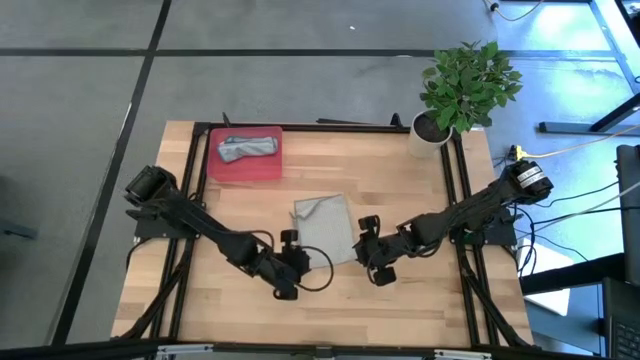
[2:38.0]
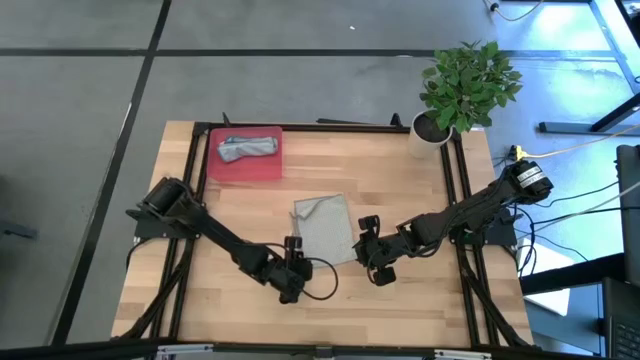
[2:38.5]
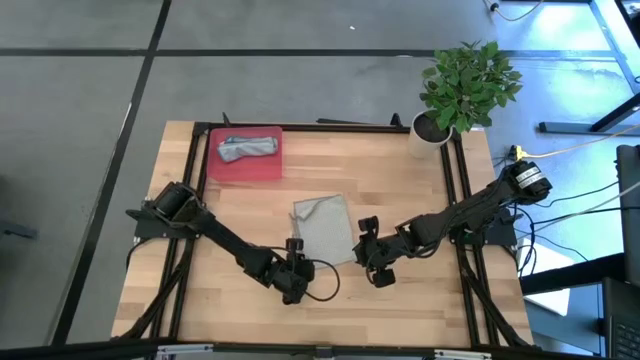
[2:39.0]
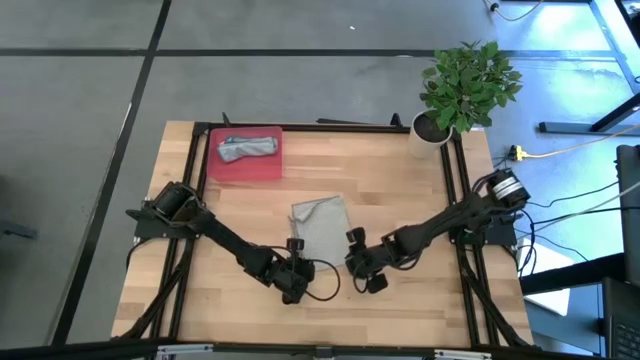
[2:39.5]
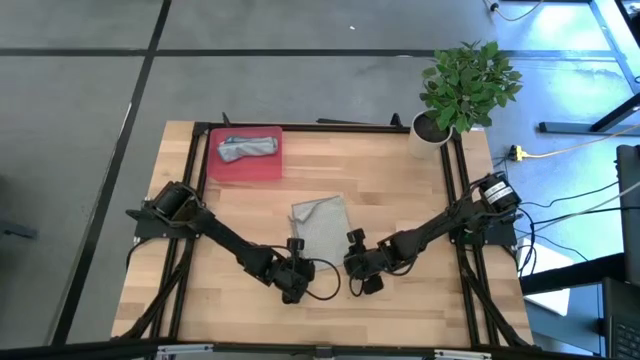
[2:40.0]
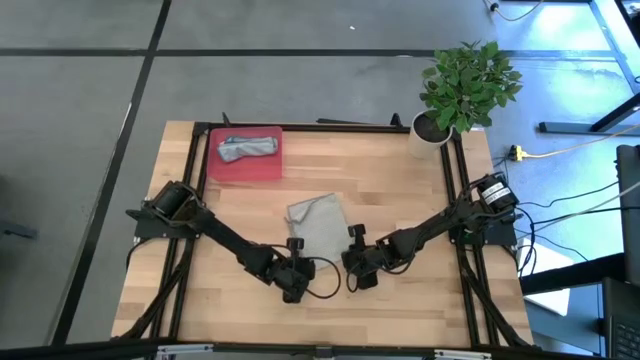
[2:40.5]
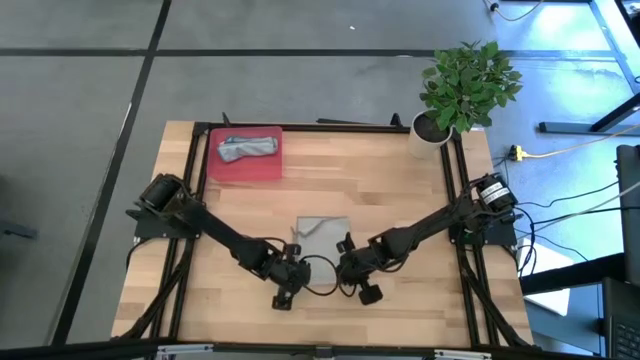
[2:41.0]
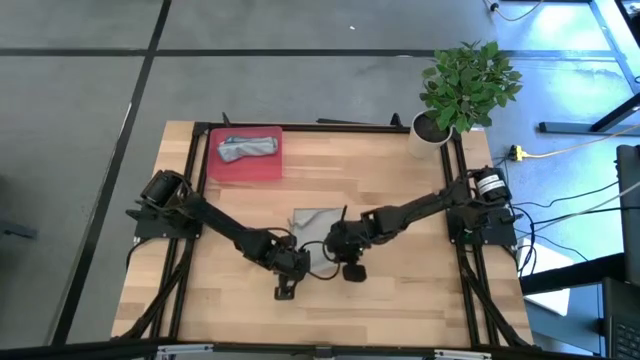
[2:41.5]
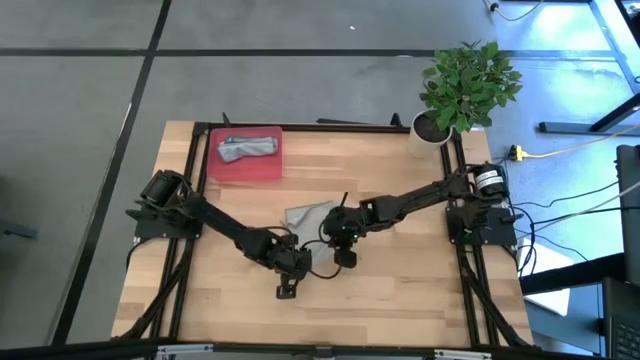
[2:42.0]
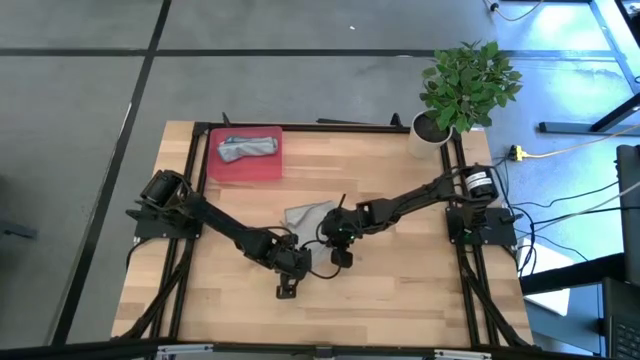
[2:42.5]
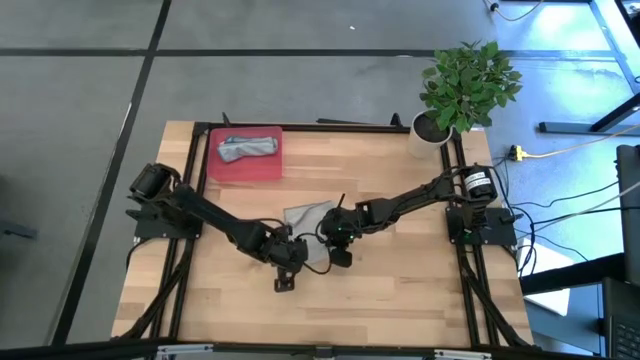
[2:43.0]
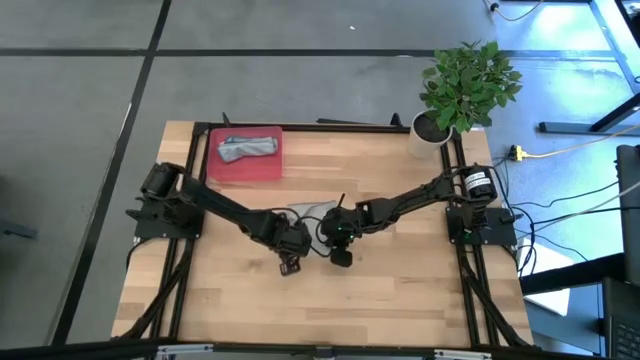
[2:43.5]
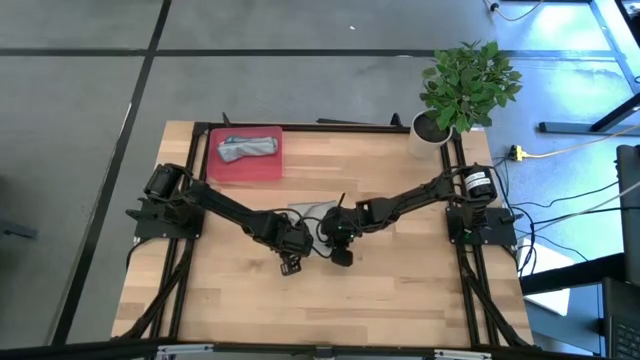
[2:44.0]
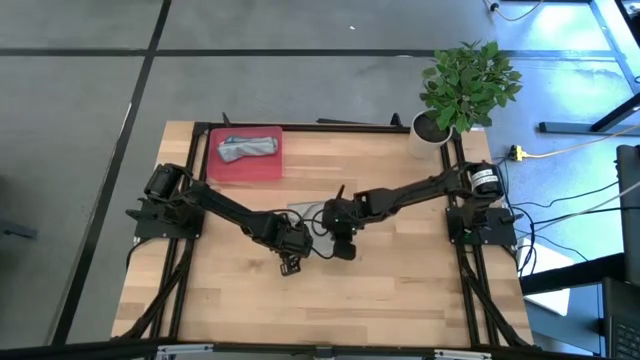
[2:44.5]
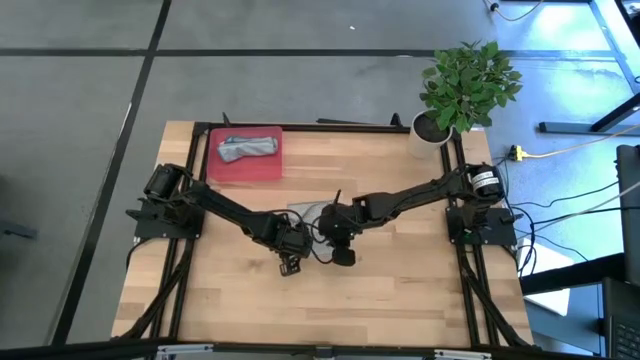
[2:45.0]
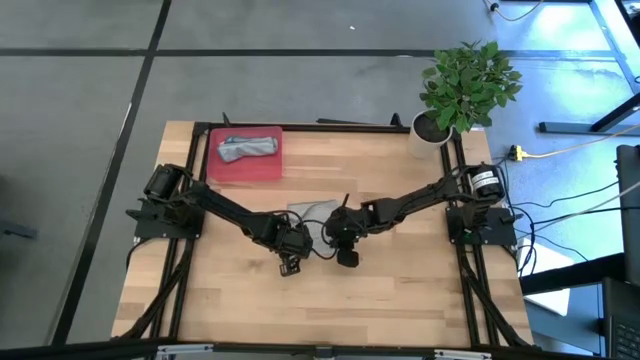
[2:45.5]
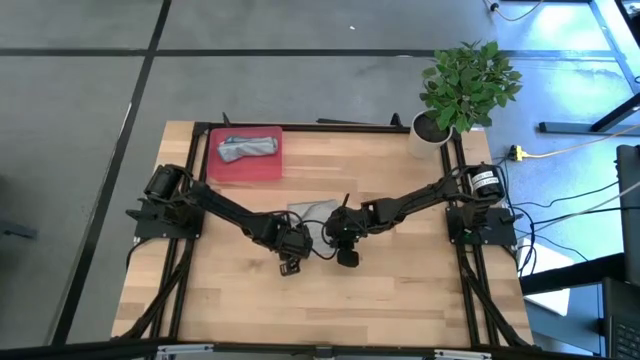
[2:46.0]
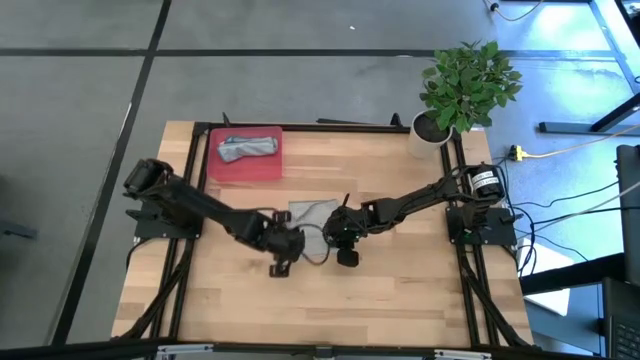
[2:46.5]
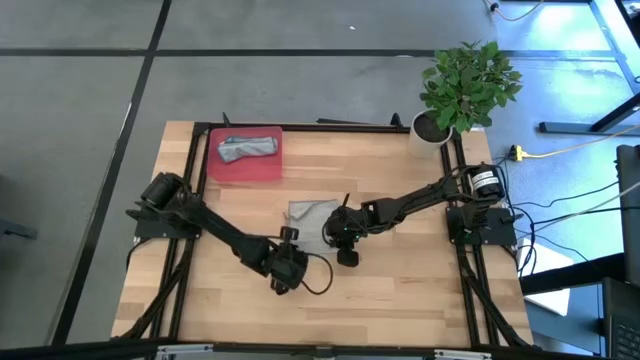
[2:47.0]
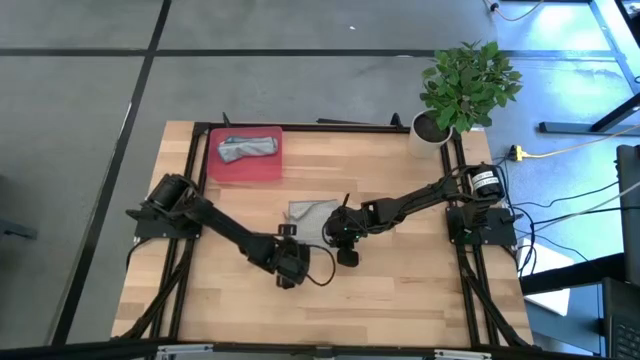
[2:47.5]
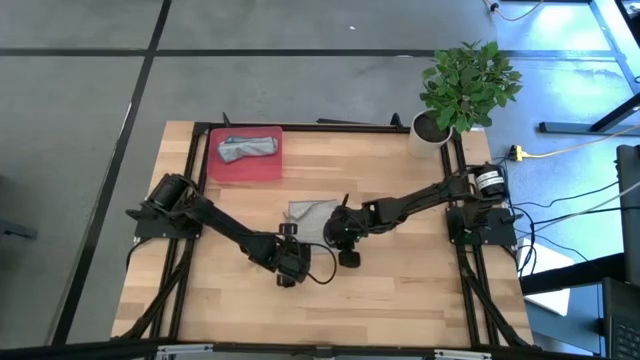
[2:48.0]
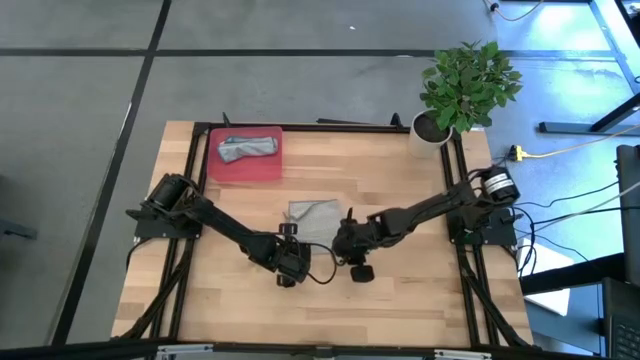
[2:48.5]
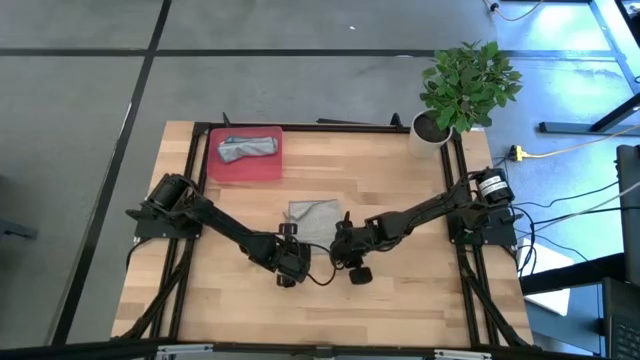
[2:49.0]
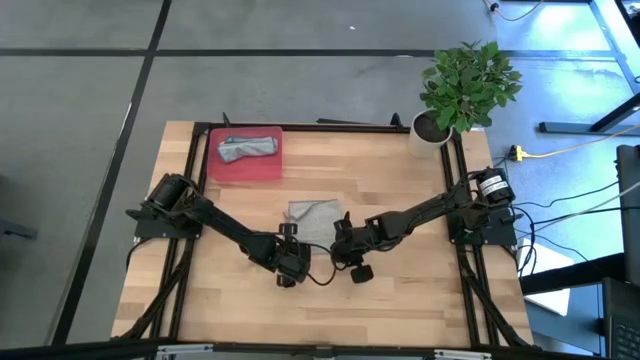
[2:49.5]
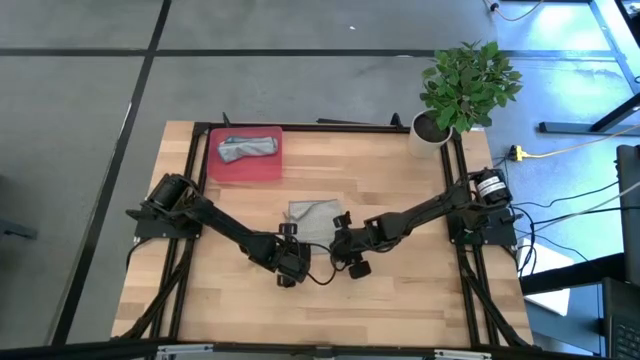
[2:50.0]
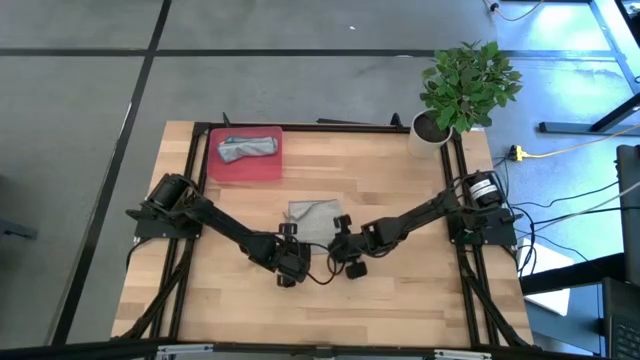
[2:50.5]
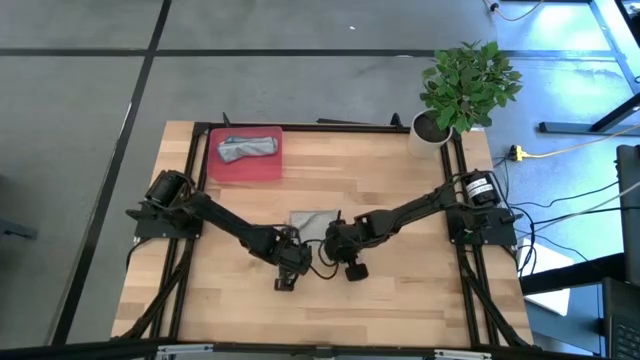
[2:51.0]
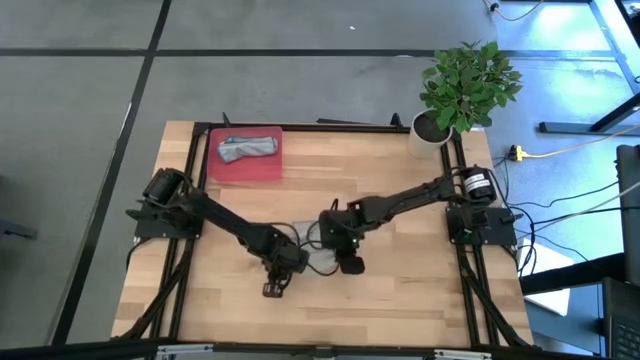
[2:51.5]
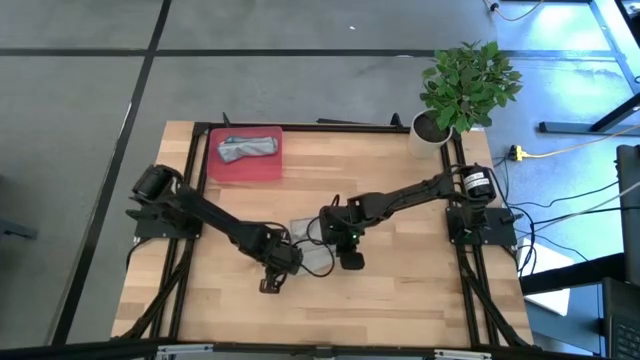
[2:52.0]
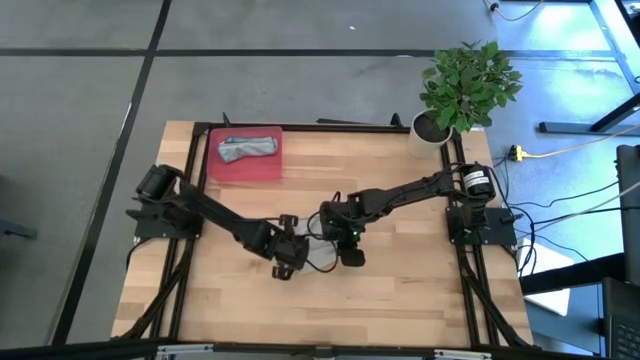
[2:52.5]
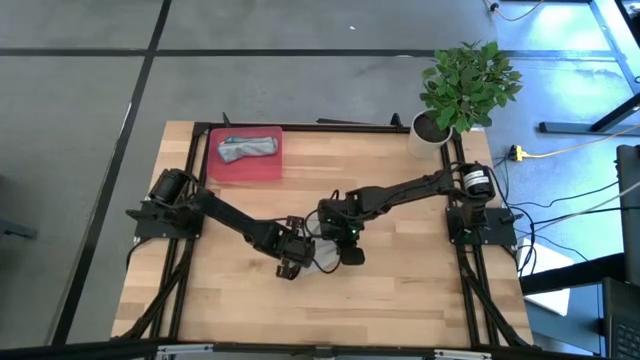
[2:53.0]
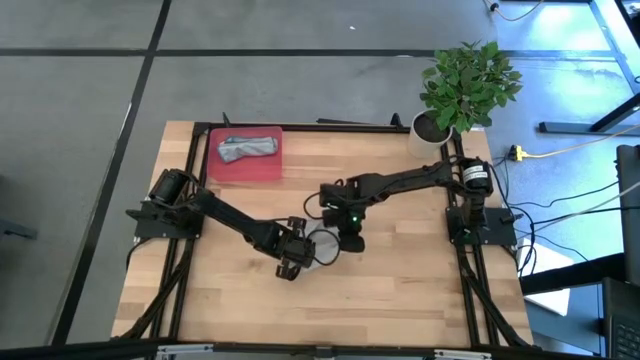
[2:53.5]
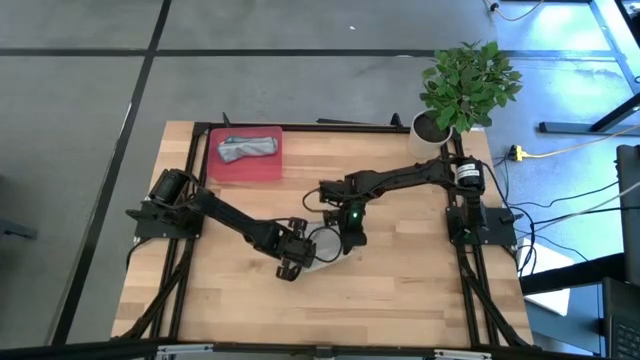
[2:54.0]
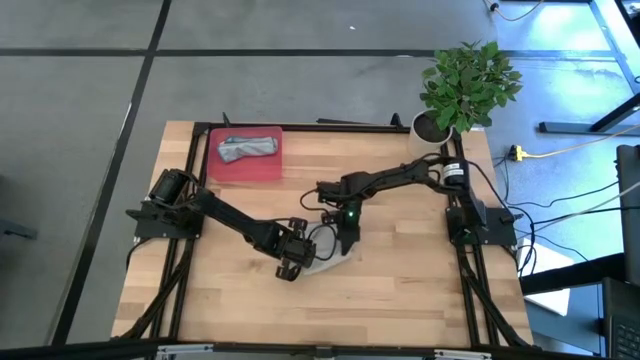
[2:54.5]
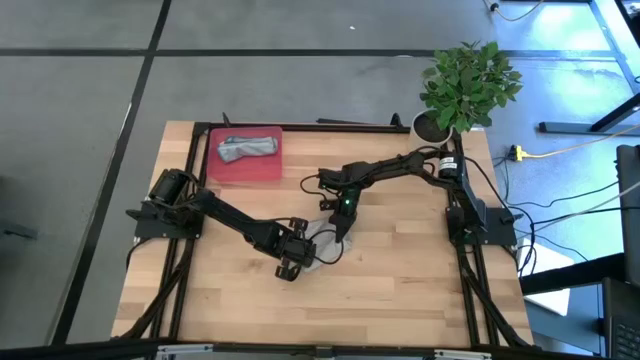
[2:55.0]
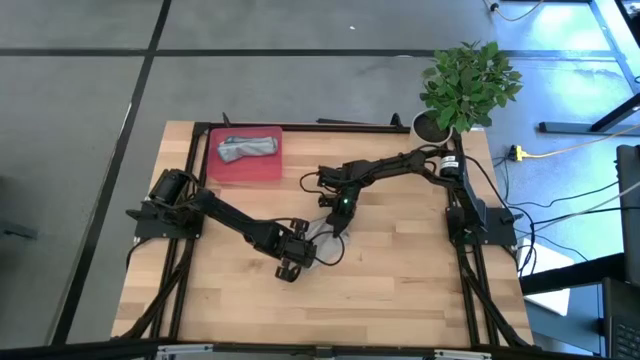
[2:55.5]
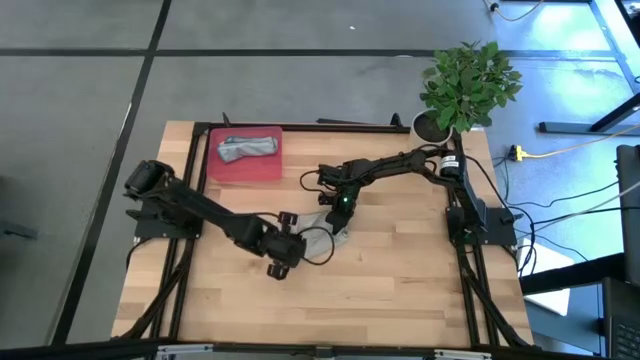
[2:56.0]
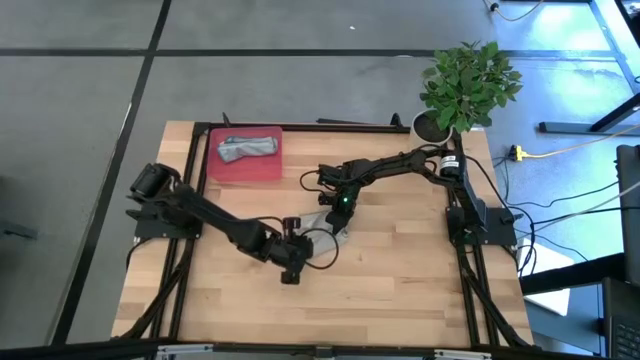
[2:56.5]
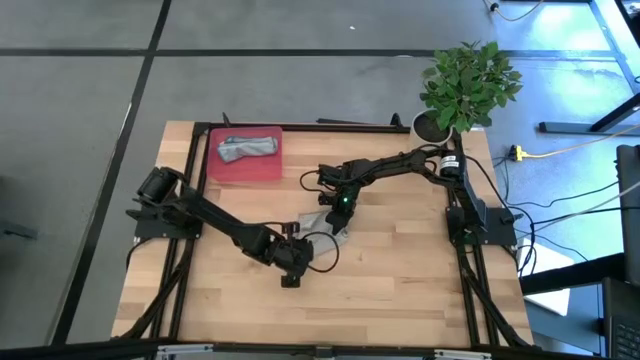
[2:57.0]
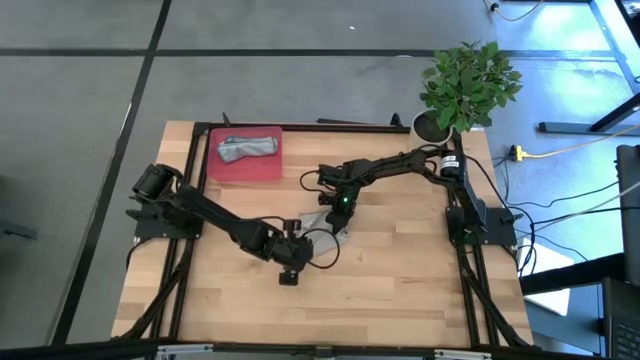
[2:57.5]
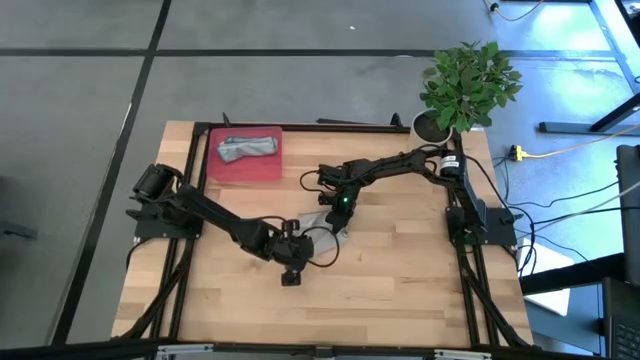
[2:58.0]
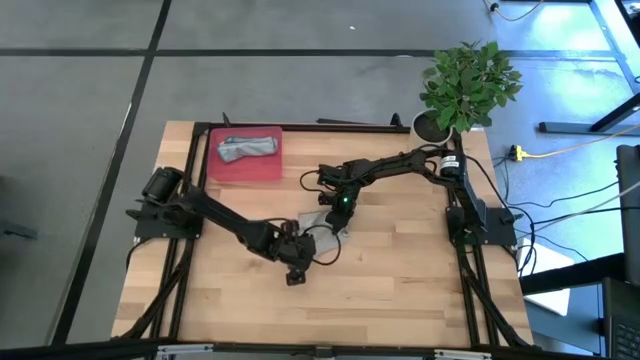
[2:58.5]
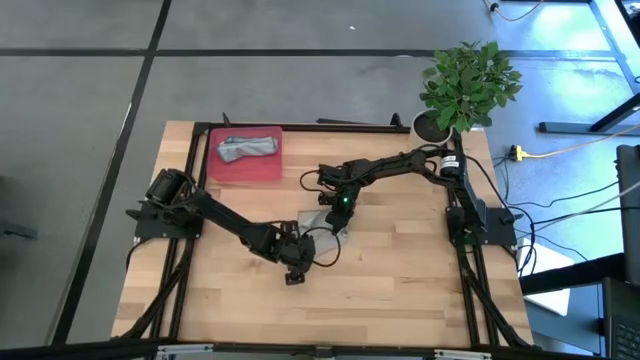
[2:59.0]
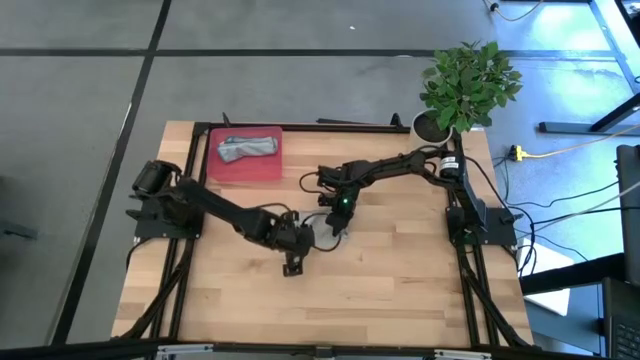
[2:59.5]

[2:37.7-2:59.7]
Task: Roll microfiber towels into tight, uniform cylinder then place into a basket
Roll the gray towel
